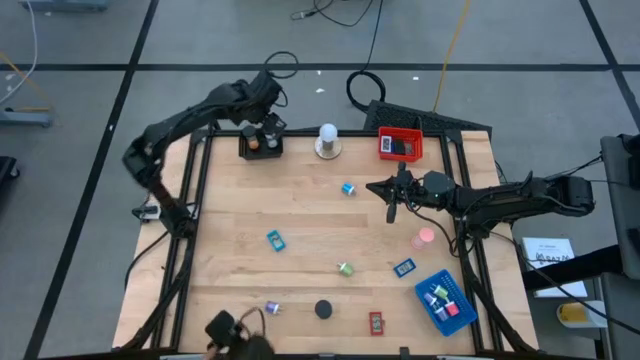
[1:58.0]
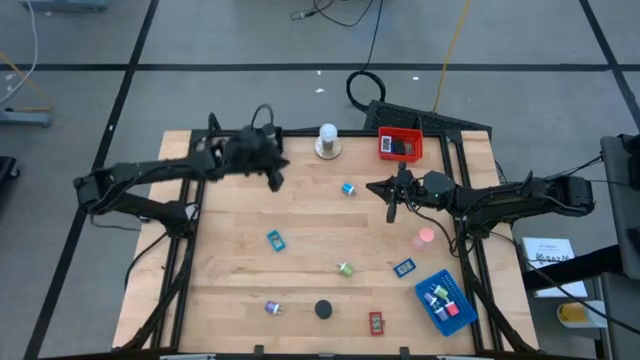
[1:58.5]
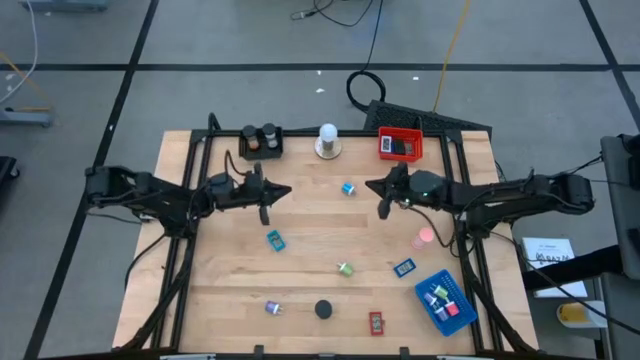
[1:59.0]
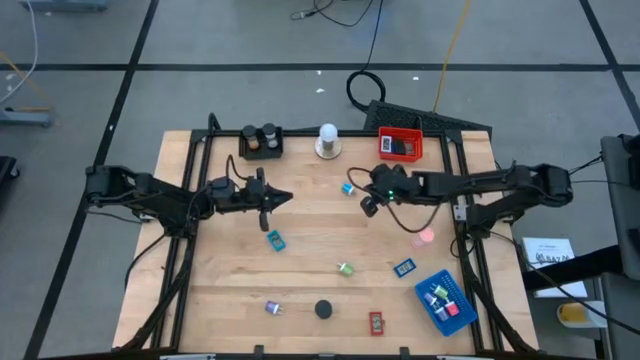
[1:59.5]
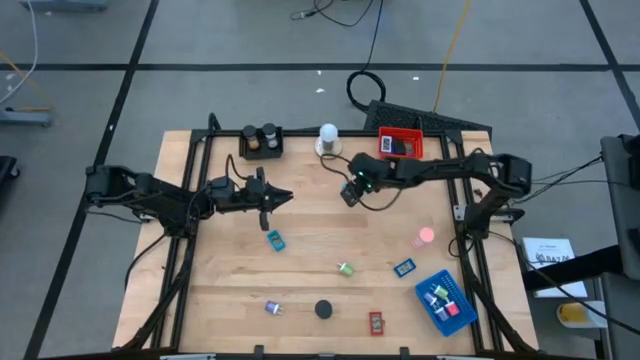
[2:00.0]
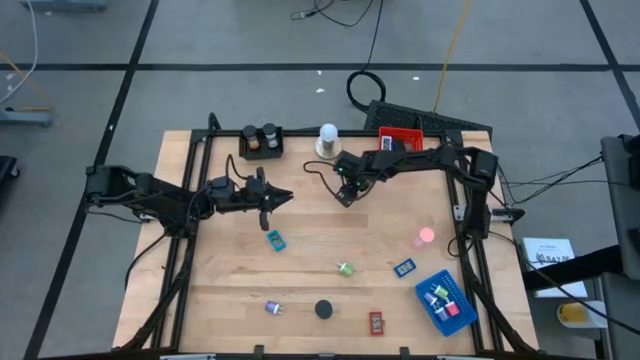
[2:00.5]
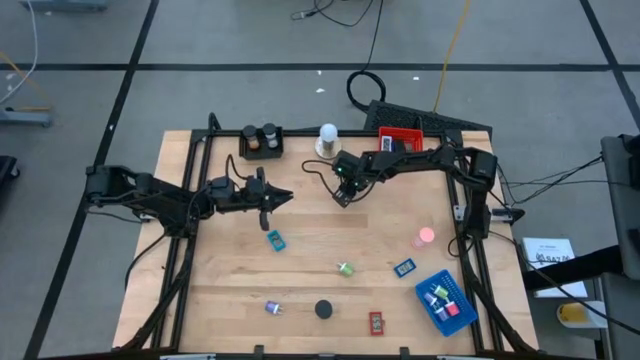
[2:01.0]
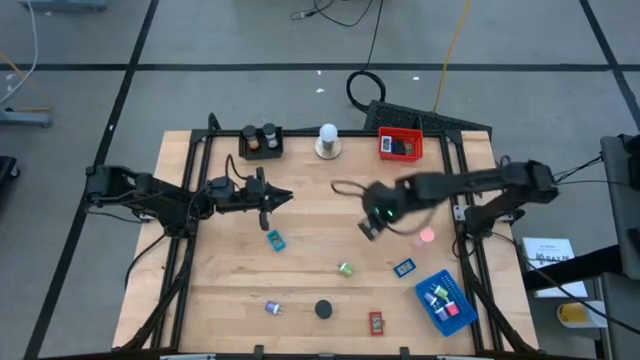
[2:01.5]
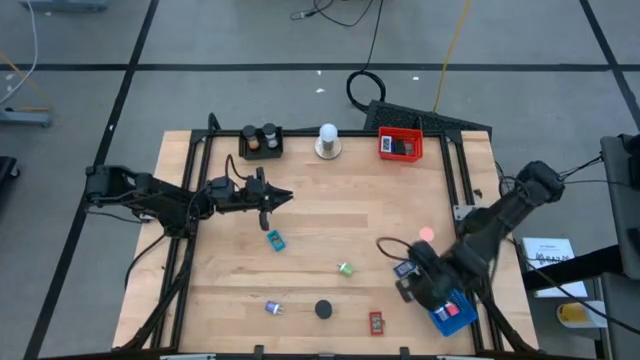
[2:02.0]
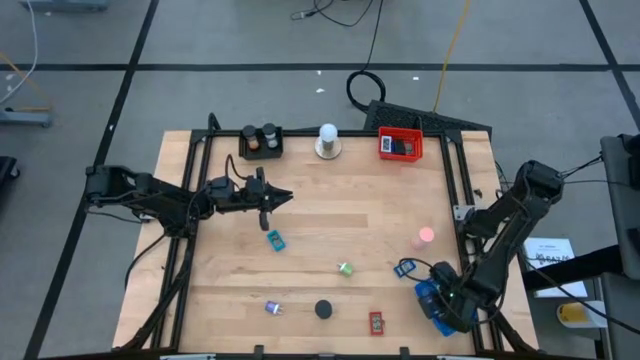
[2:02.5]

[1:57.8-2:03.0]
Task: Pick & Place Office items
Put the blue charger adapter into the blue bin

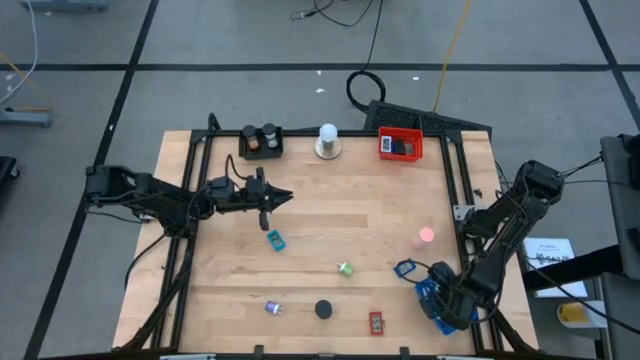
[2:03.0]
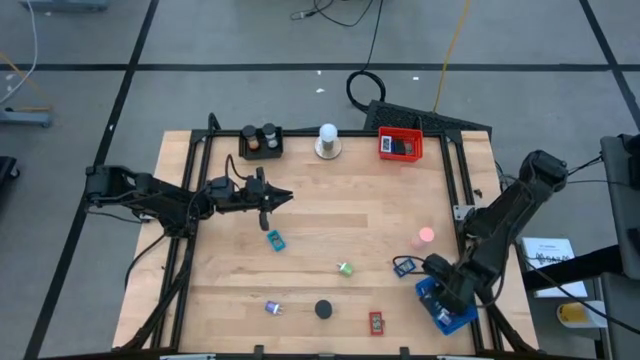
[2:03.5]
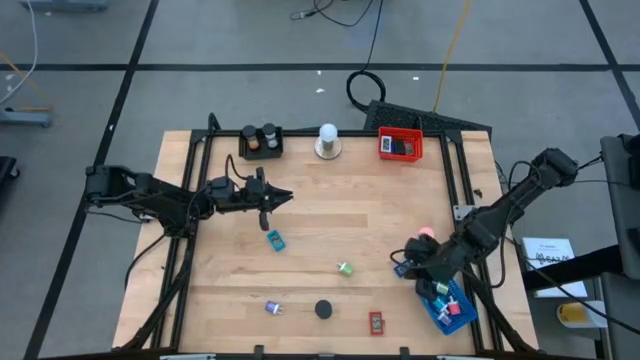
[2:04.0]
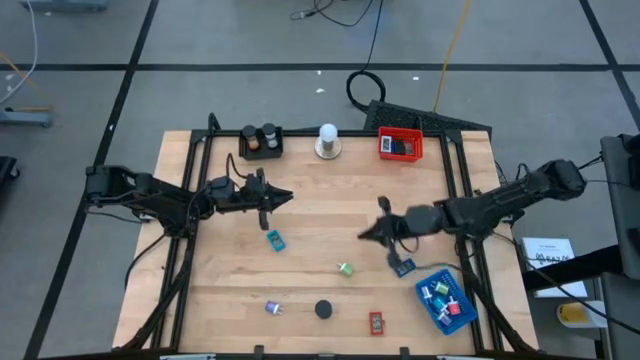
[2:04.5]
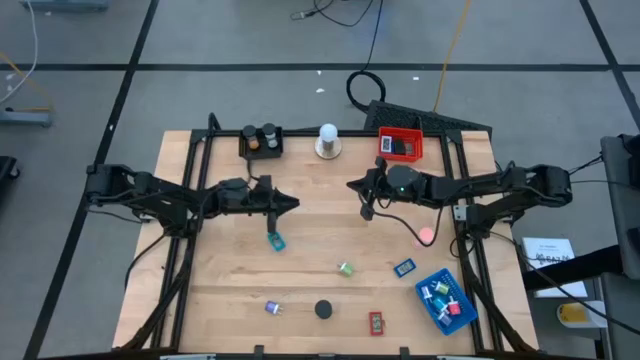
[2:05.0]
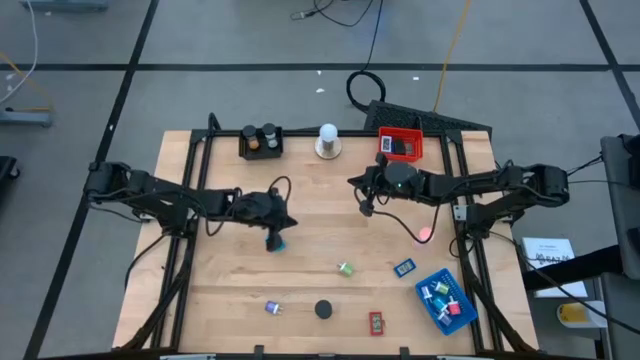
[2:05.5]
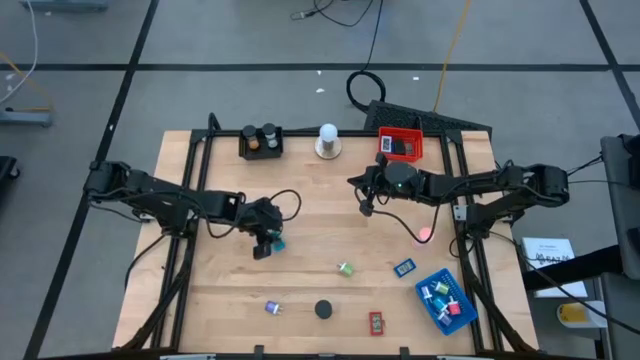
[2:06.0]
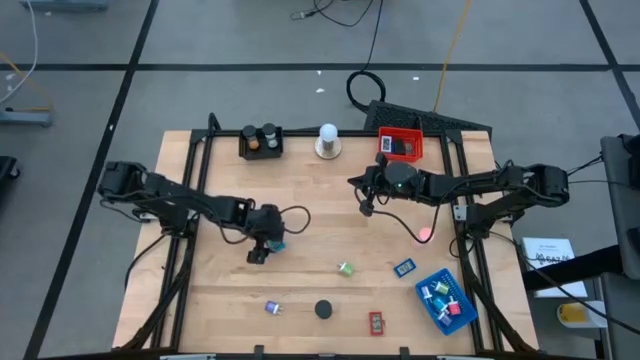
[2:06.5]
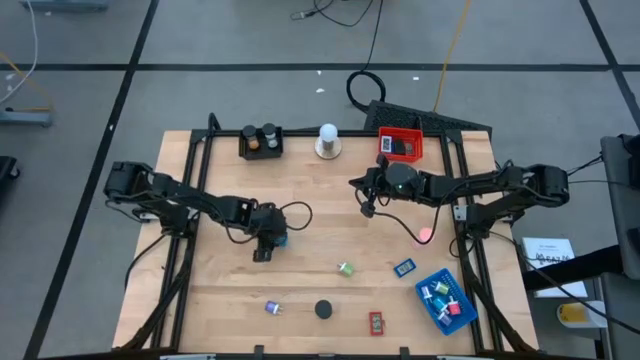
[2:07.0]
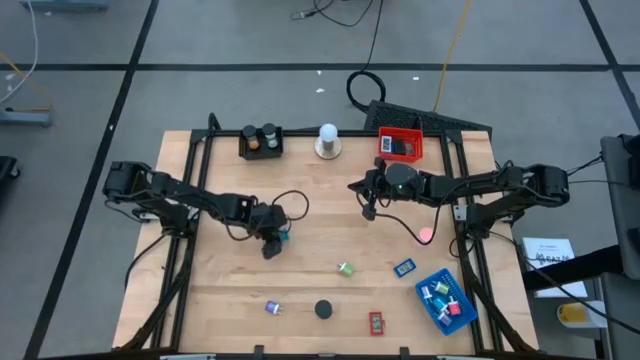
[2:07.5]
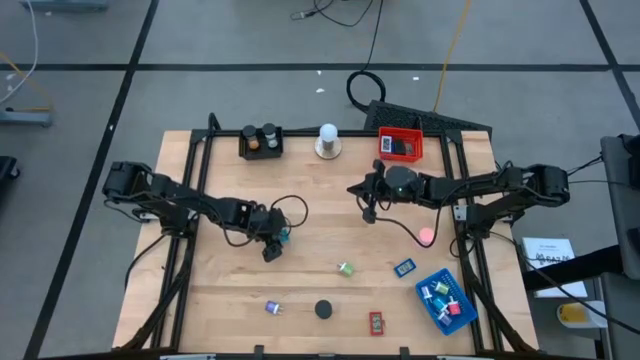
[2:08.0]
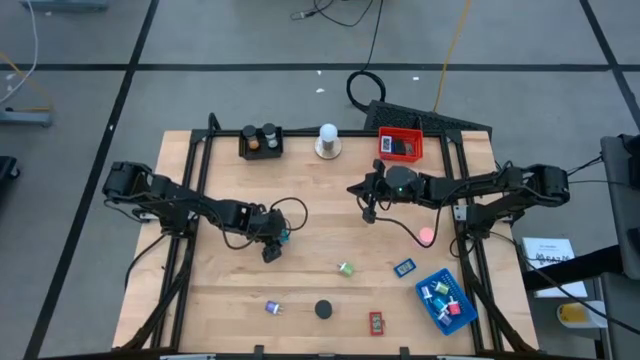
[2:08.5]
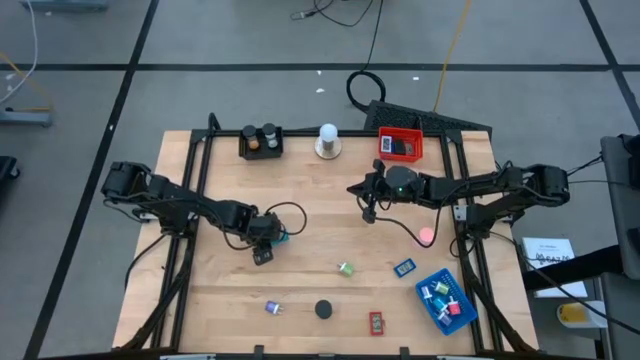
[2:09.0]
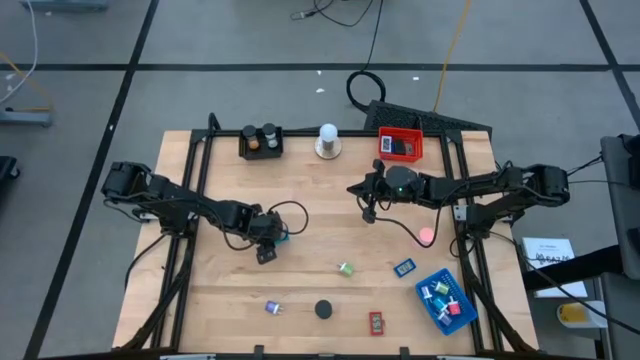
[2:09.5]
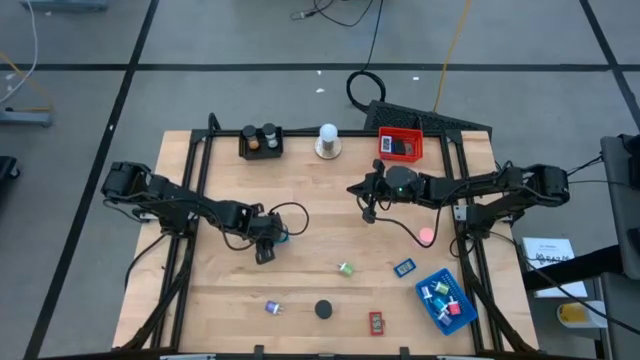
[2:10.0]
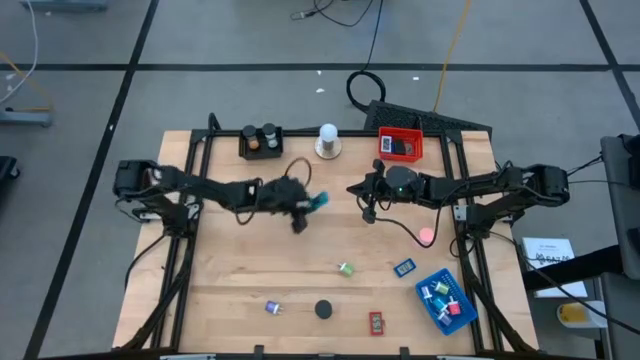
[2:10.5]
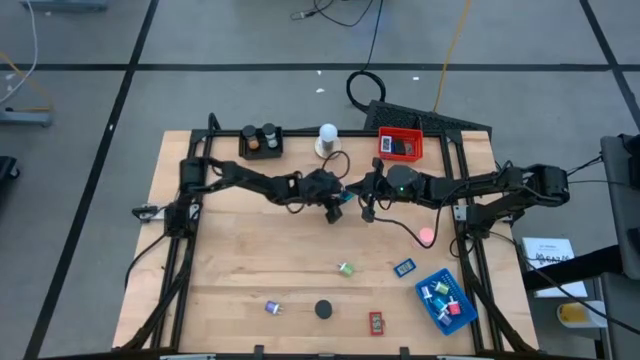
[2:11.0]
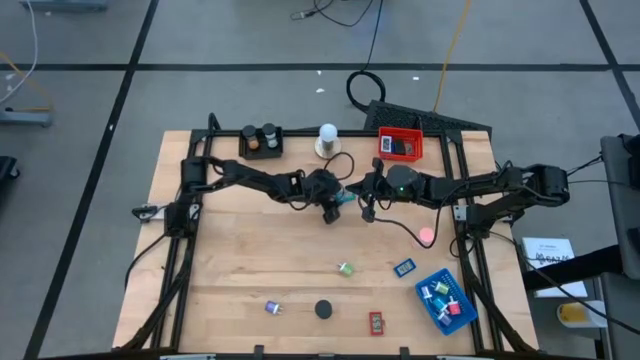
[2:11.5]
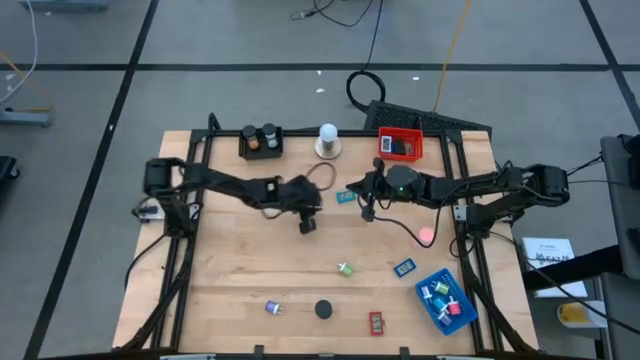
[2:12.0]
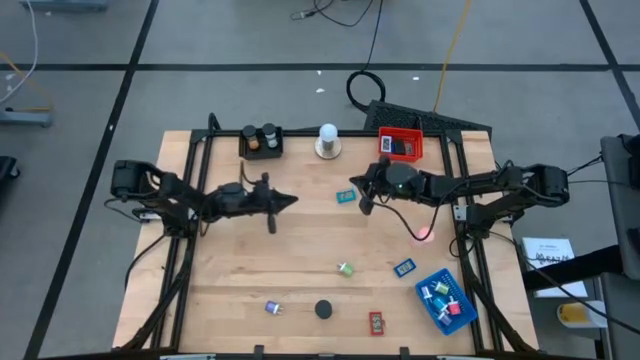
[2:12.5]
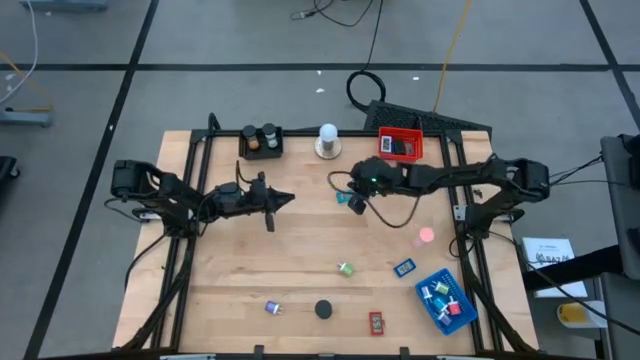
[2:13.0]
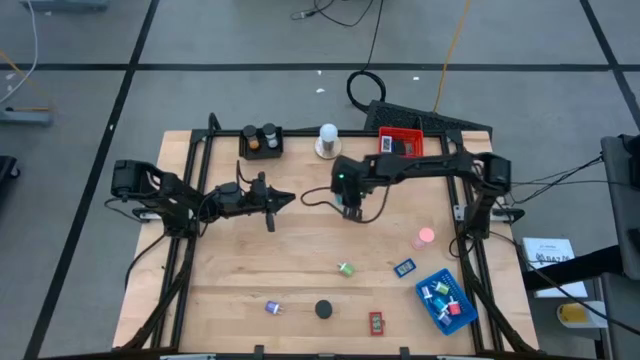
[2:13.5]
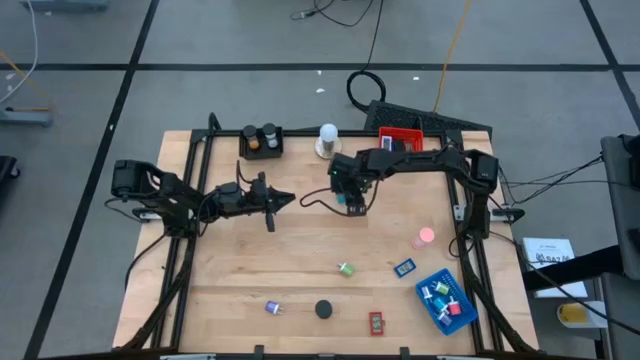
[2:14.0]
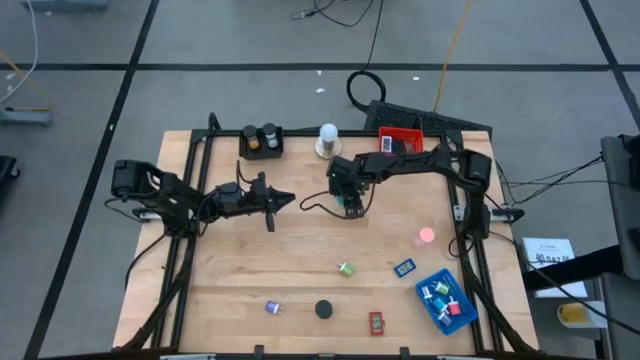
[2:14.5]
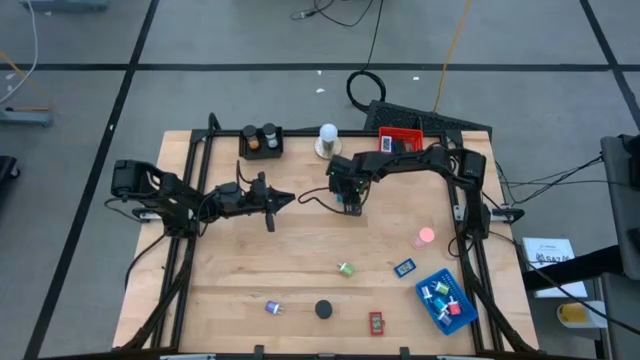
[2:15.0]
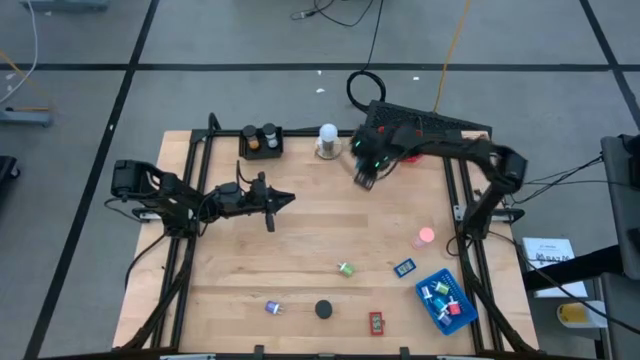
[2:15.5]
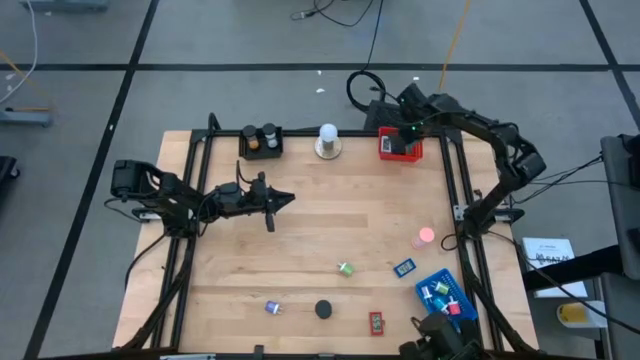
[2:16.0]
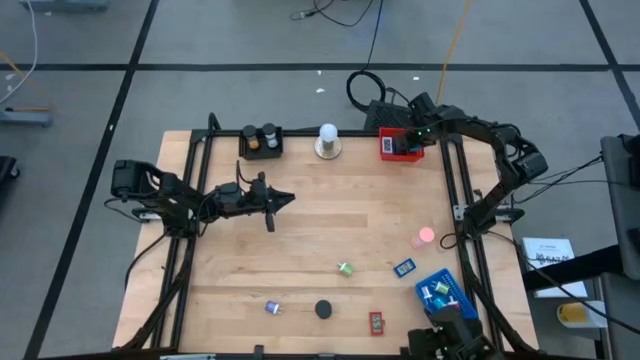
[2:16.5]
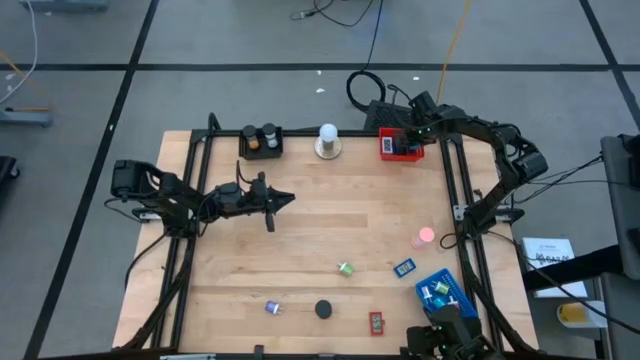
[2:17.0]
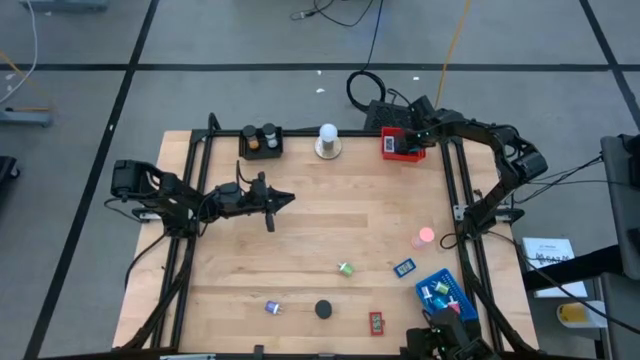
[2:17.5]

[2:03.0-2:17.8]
Put the light blue digital timer into the red bin

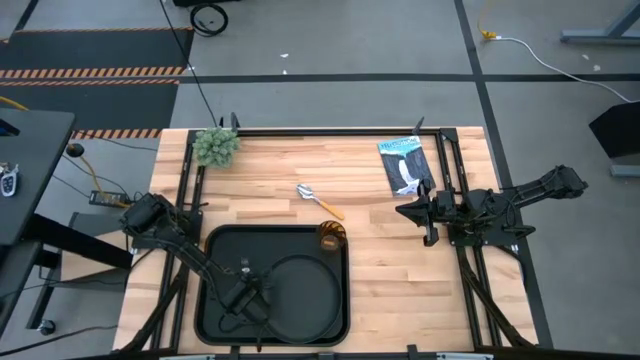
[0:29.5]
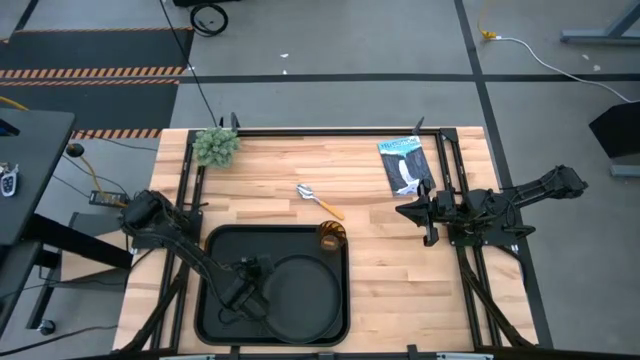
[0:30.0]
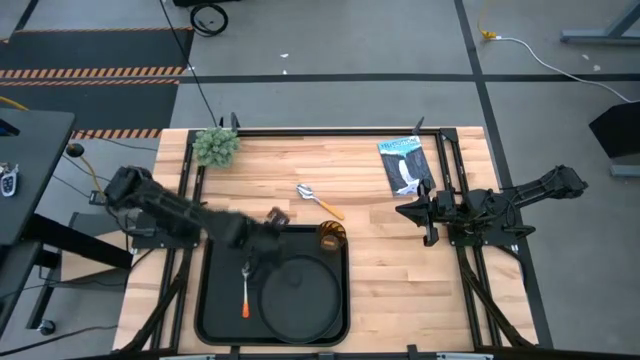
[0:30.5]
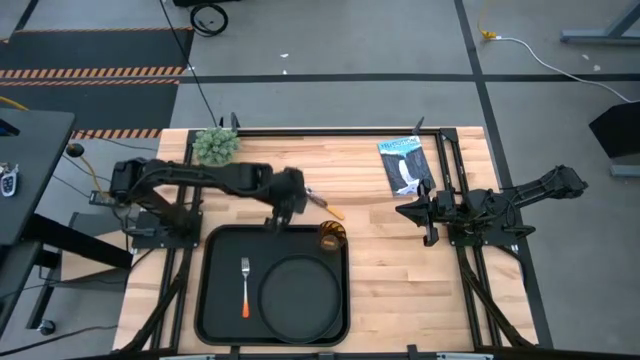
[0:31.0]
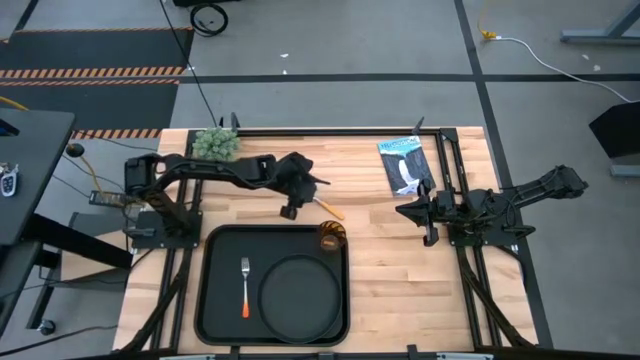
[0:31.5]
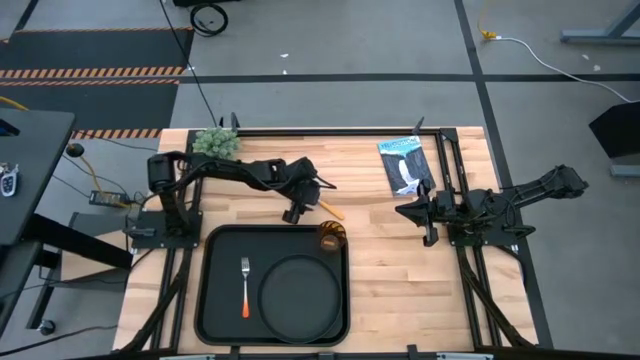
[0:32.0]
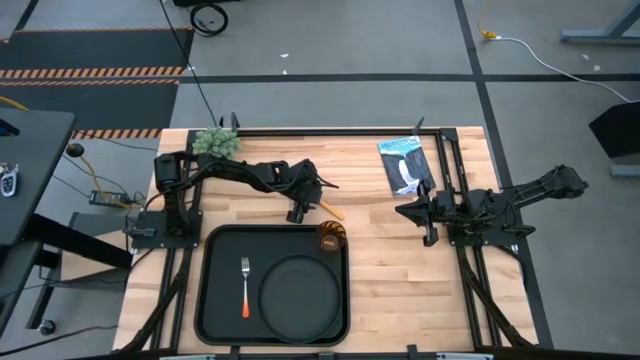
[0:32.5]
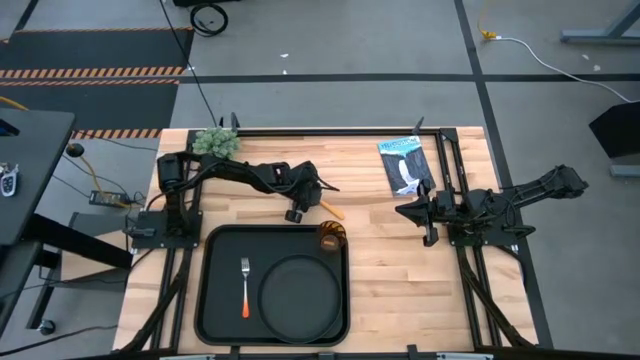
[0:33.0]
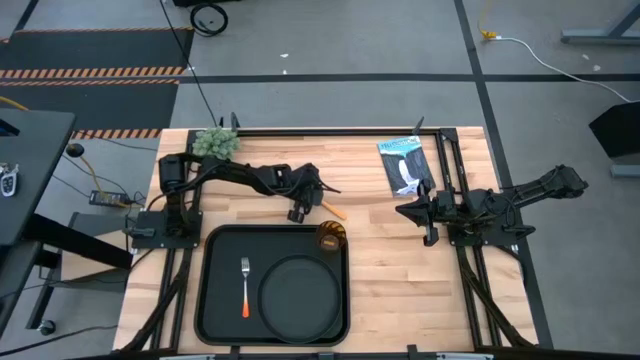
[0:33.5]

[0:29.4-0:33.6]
Task: Pick and place plate/cup/fork/spoon on tray
Put the yellow spoon on the black tray on the left of the orange fork
